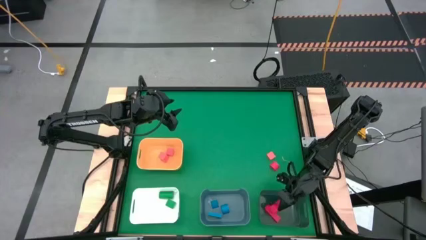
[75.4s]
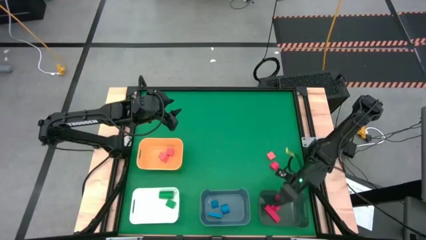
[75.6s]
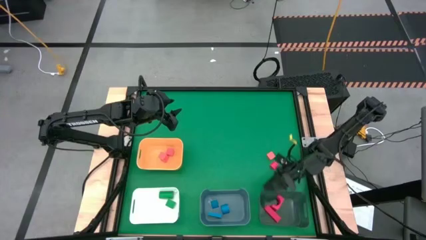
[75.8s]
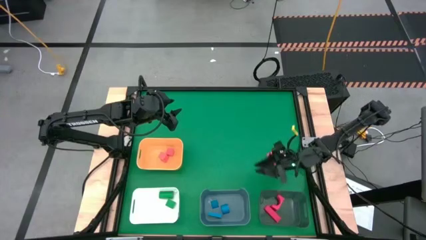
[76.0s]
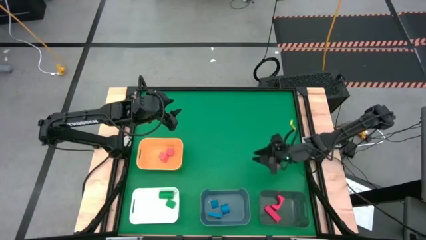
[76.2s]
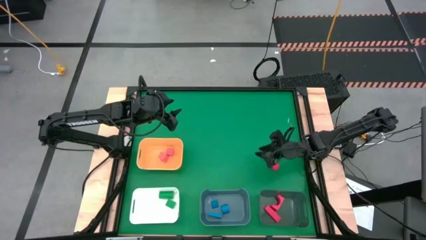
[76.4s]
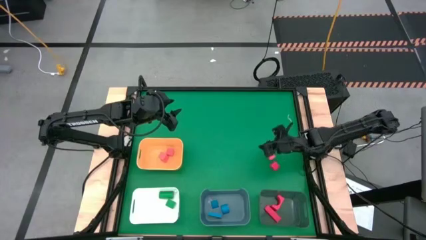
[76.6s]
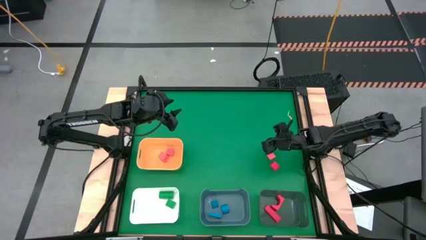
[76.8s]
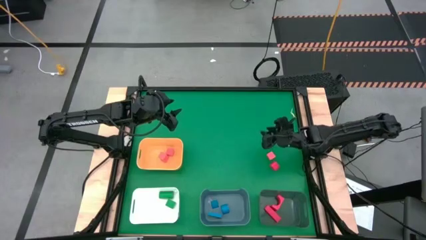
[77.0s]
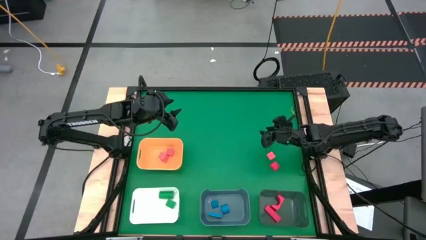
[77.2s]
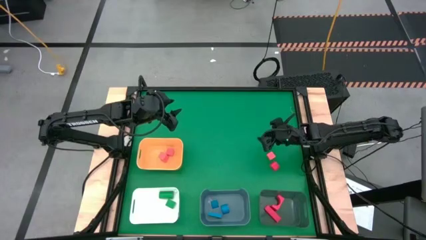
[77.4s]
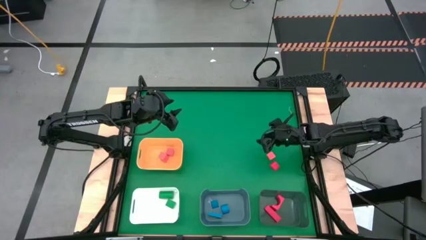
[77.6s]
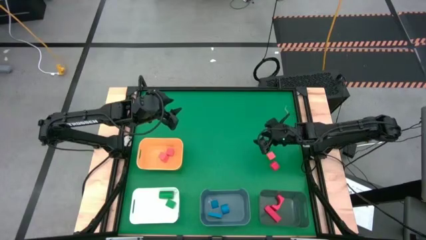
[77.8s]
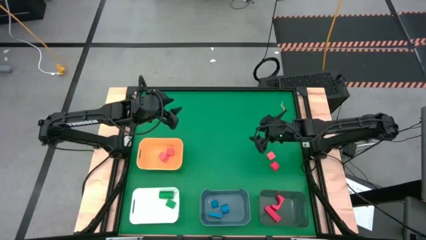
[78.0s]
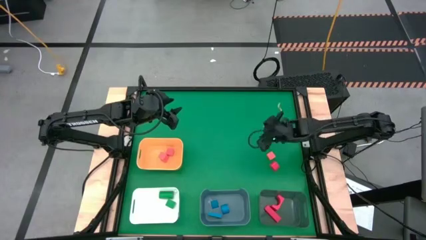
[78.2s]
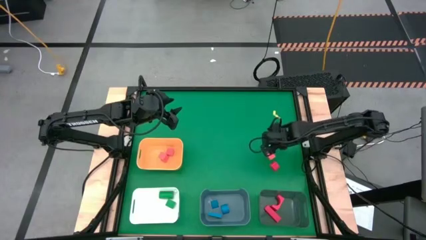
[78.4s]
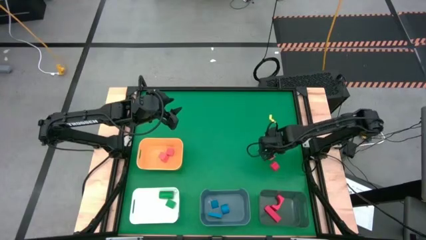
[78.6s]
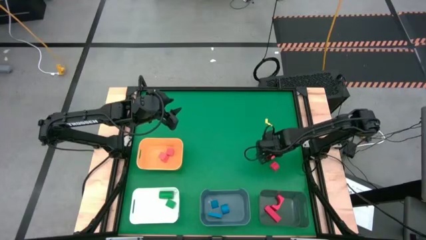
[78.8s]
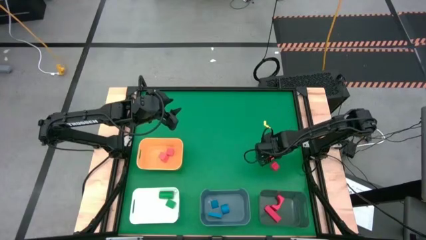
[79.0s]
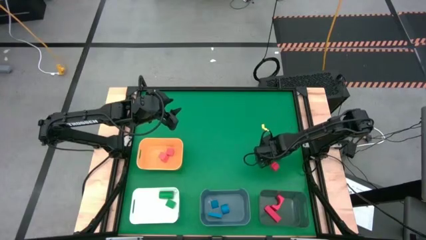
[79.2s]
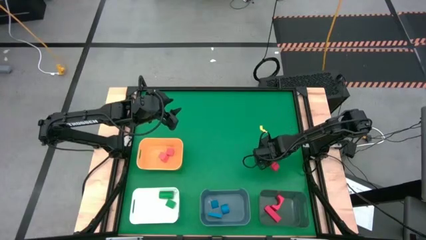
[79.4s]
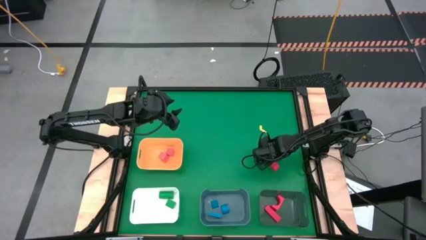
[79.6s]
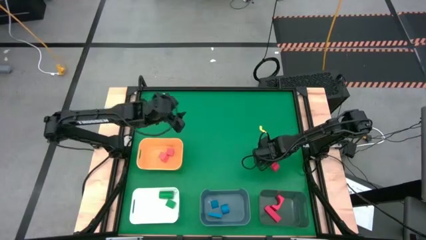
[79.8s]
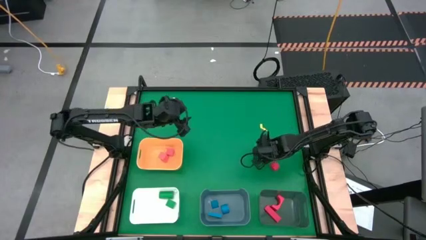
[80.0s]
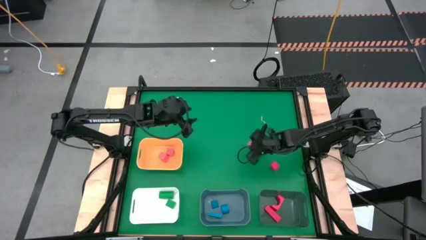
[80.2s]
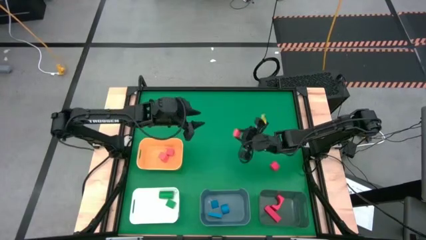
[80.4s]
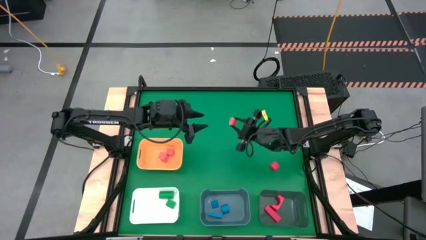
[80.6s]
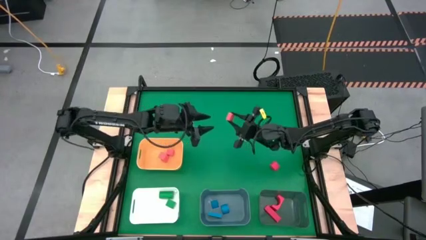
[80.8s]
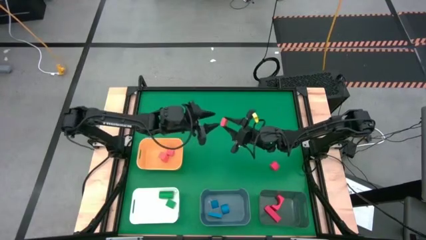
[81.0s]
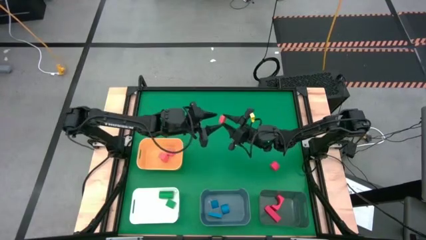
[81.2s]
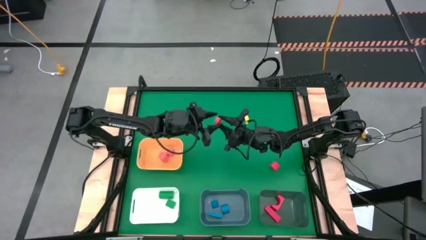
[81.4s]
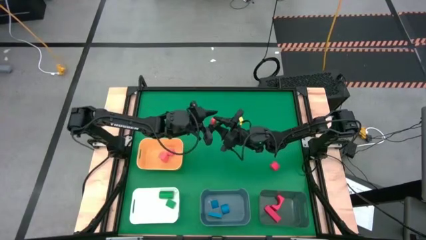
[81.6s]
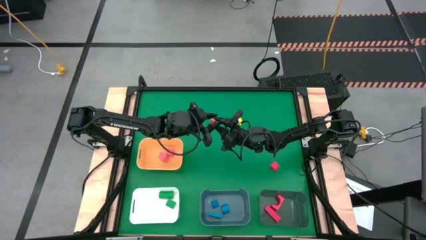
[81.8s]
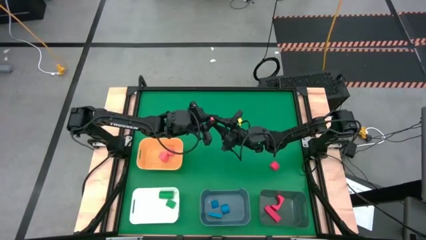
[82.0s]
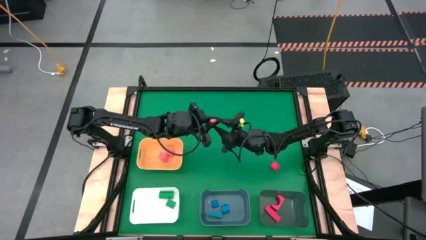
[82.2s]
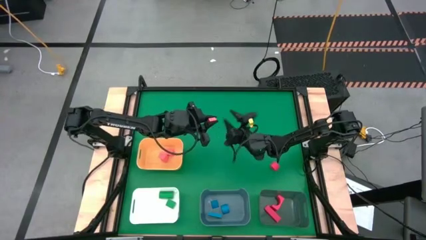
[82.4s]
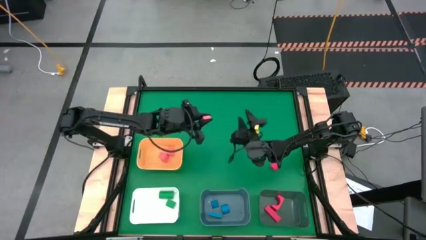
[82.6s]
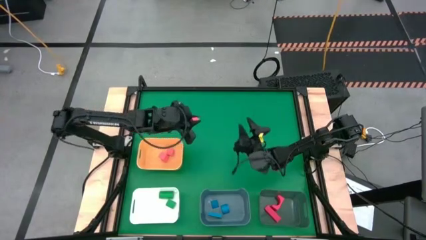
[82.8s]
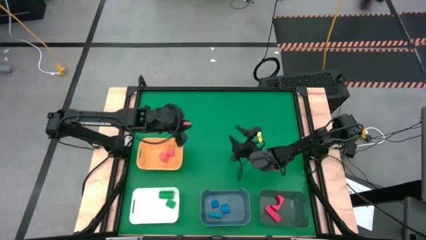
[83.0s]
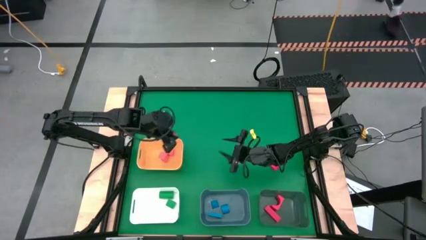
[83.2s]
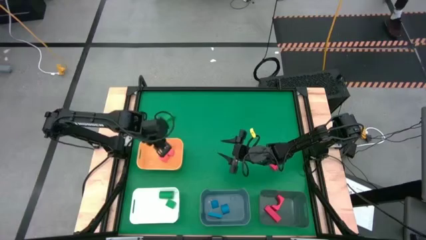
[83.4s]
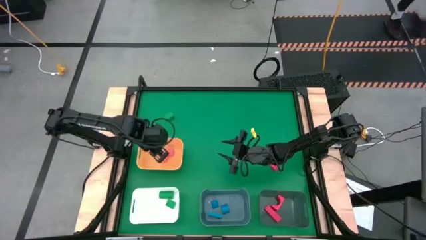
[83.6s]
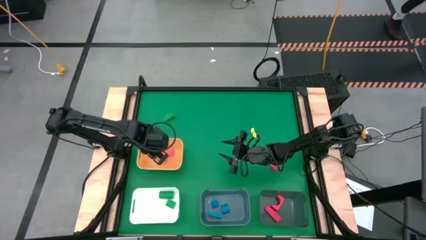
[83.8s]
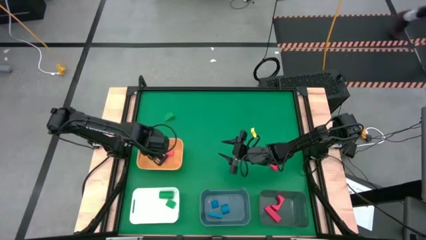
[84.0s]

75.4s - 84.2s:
Task: Sort & place blocks by color
Put the orange block into the yellow bin

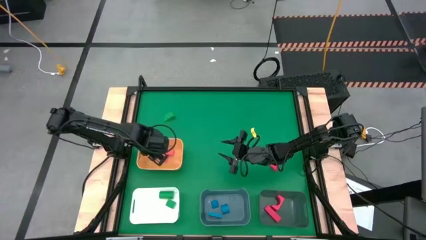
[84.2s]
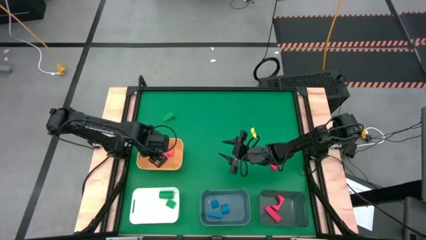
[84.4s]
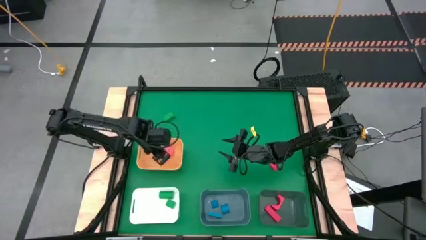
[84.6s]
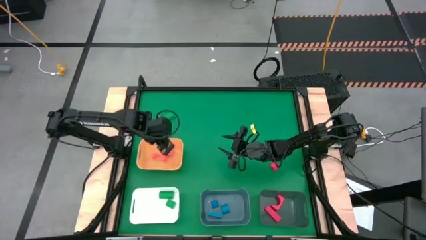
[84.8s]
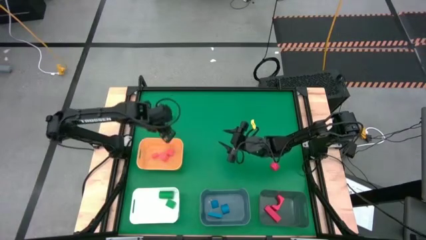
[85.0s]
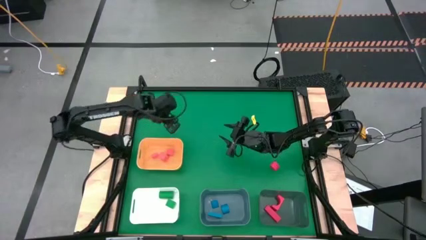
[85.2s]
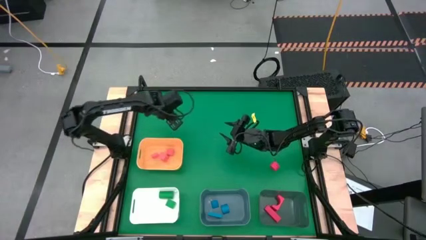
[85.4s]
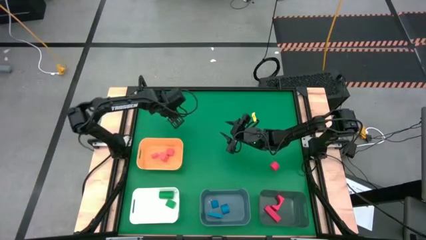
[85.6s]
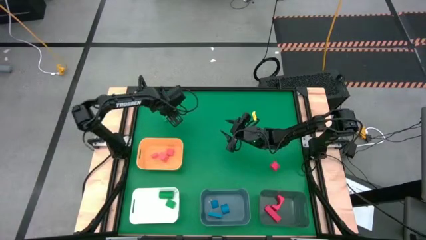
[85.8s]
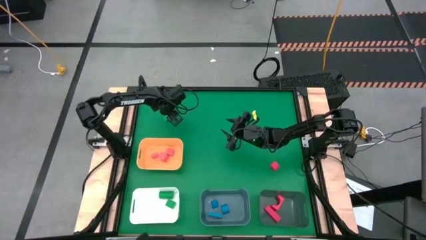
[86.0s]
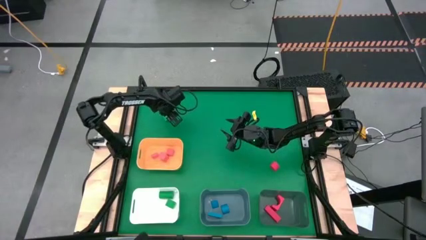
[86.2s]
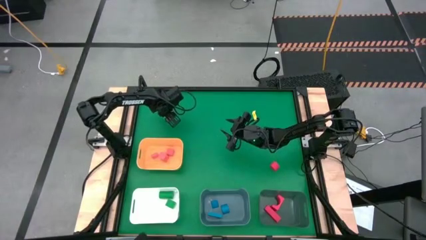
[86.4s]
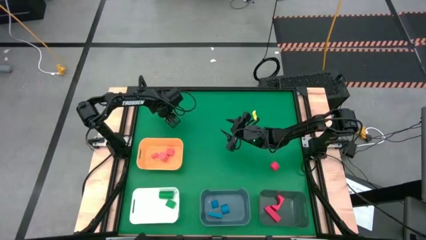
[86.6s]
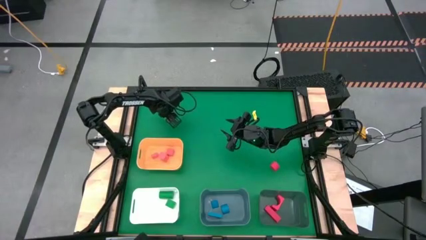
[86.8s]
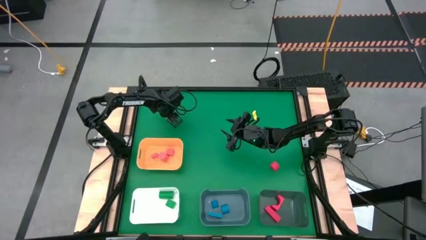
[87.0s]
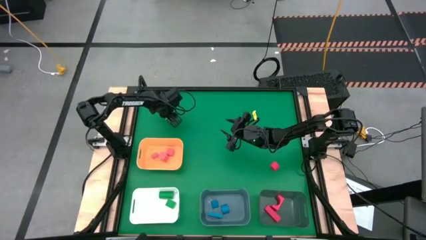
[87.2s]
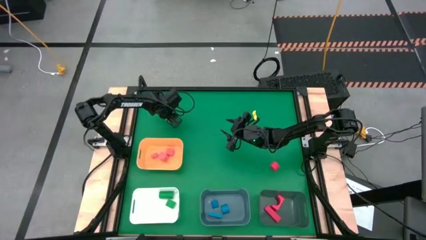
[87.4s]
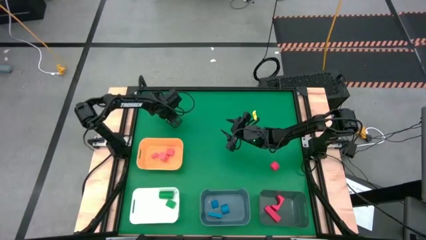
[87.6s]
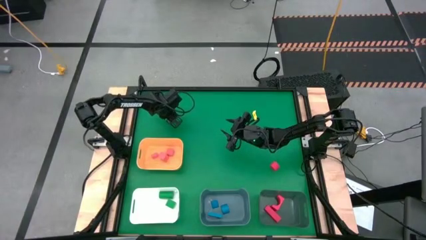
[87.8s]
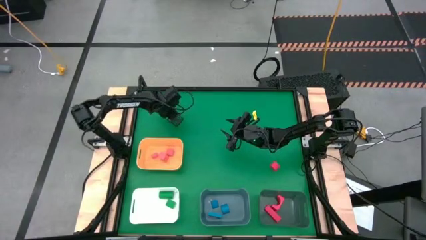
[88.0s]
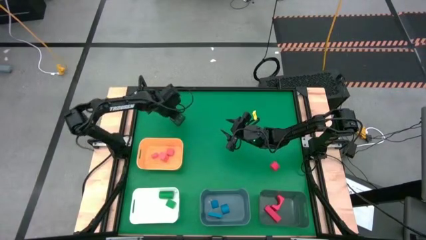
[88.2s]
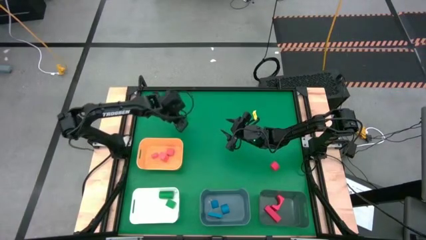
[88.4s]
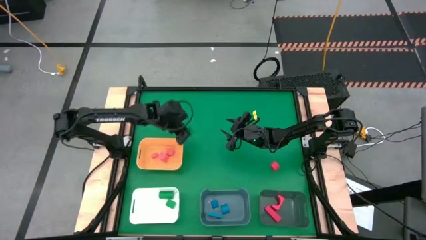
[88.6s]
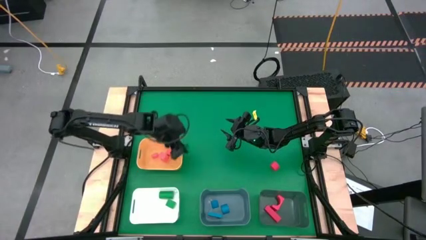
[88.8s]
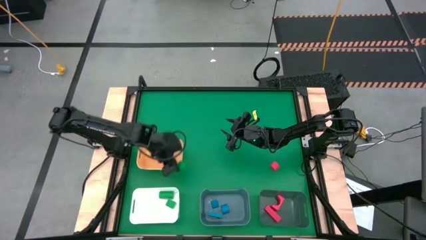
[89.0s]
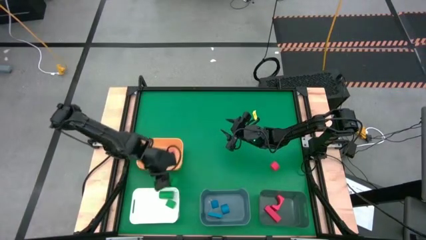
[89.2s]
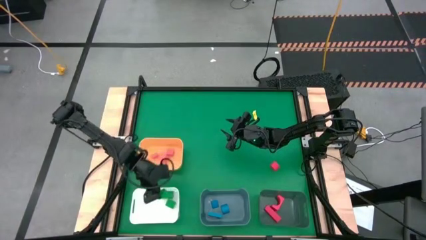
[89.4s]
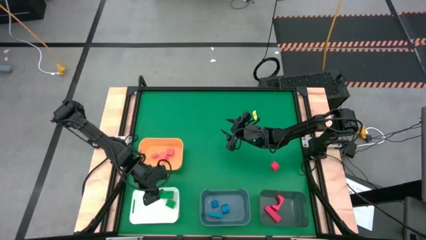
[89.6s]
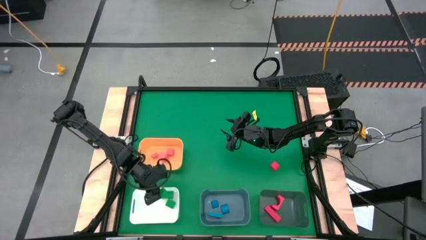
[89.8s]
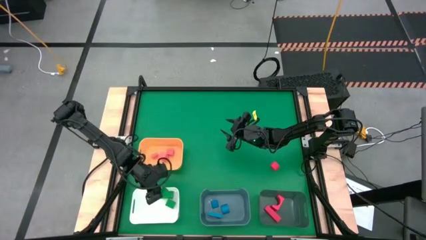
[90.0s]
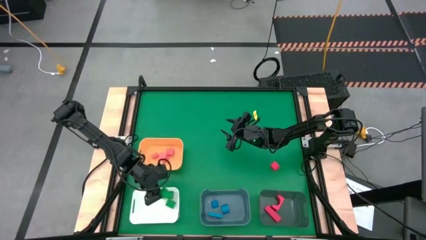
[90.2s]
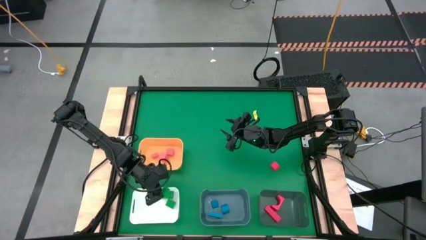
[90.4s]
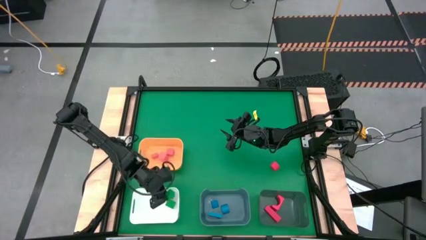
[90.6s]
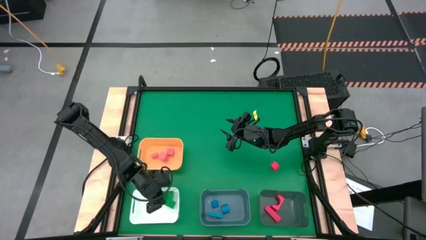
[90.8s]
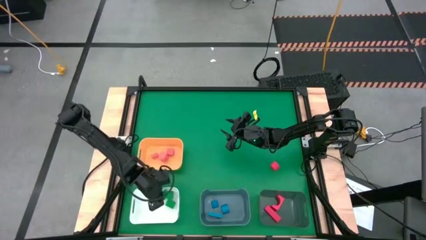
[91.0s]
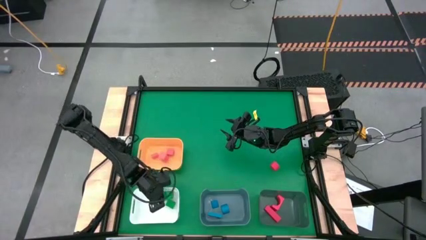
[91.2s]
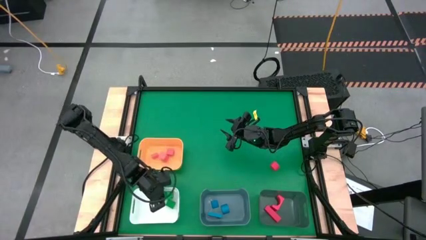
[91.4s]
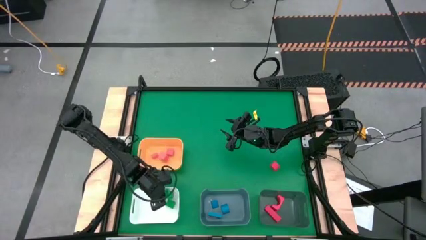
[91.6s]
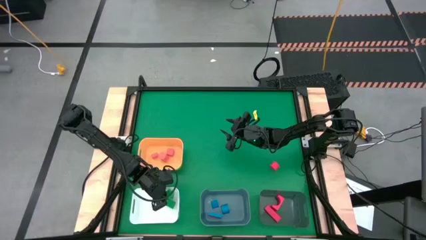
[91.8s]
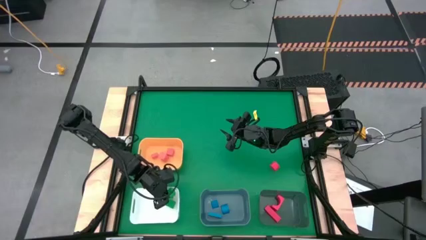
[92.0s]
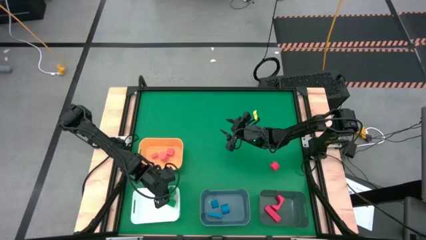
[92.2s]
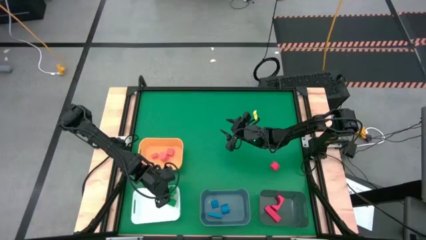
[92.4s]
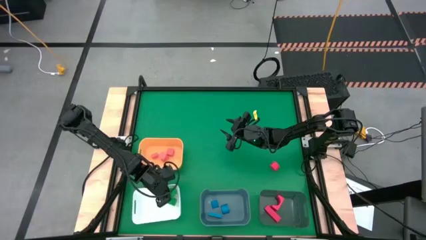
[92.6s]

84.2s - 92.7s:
Put the green block into the white bin
